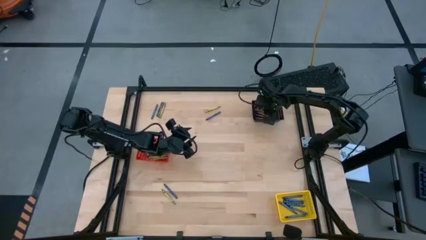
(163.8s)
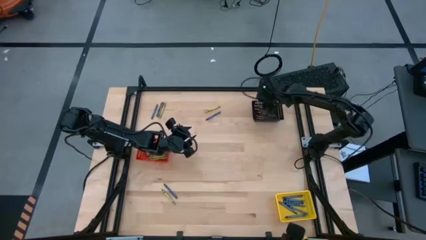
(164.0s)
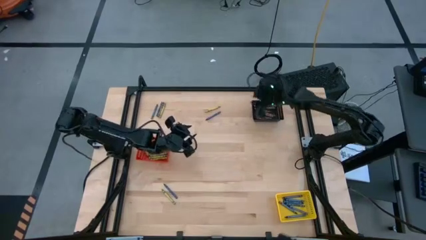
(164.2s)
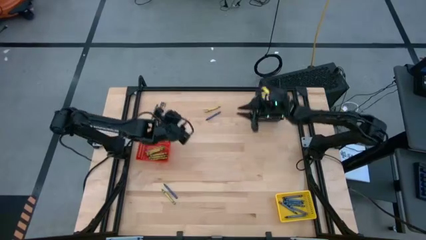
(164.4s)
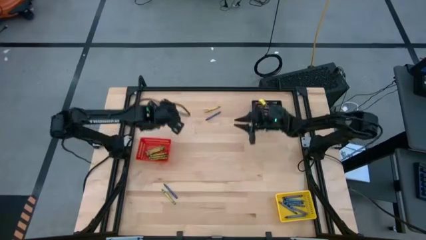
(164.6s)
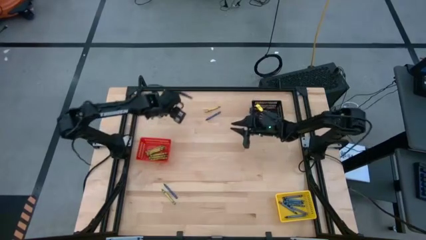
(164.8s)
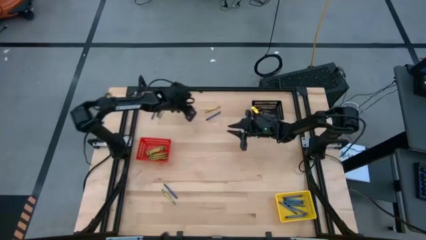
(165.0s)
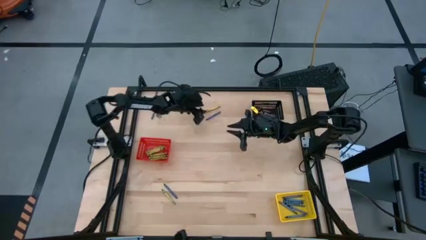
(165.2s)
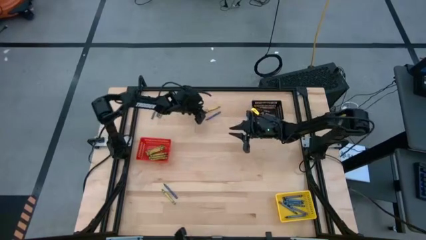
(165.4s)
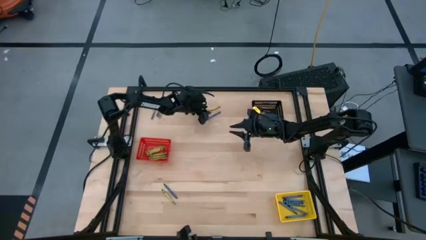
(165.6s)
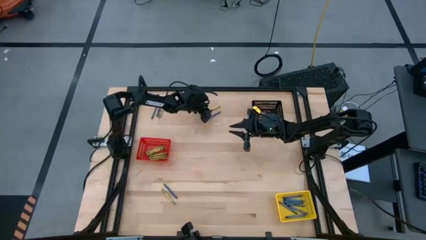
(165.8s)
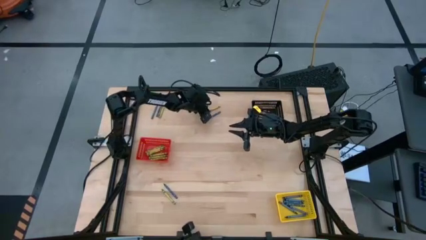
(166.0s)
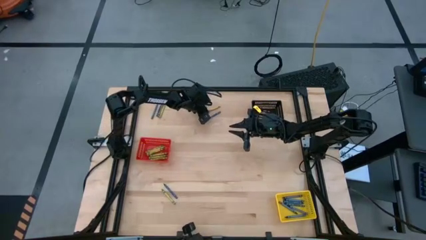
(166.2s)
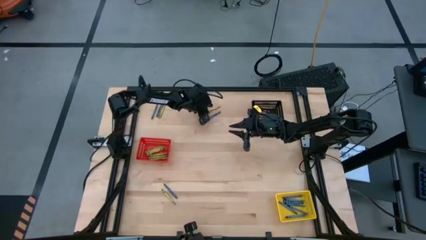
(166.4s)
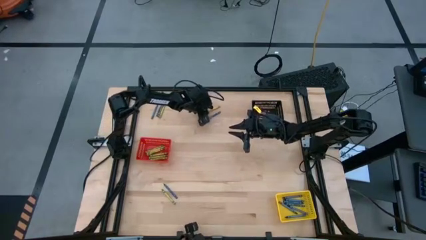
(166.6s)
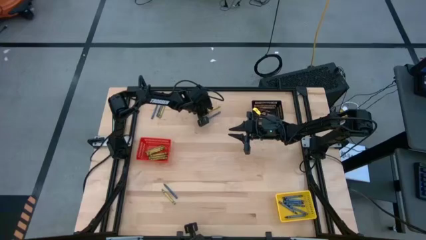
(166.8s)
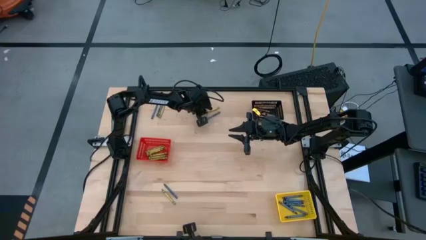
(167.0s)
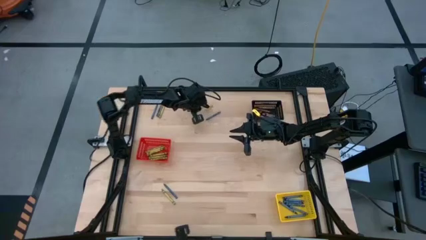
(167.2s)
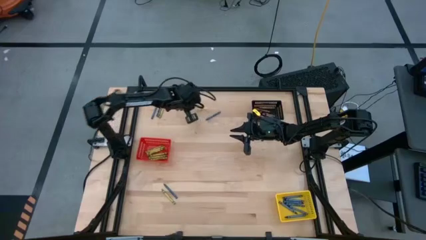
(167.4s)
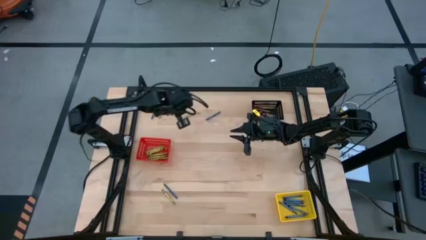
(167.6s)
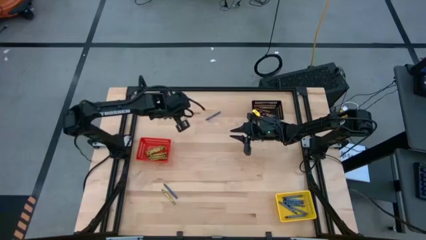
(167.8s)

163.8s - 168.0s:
Task: Sort crayons
Put the light green crayon into the red bin

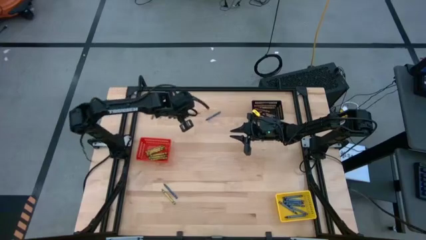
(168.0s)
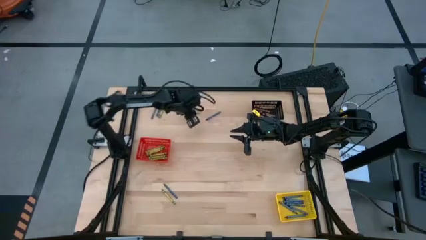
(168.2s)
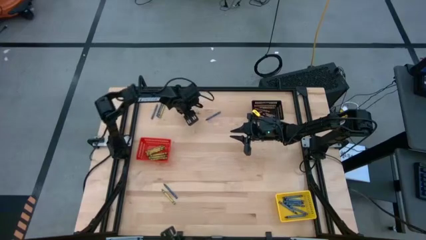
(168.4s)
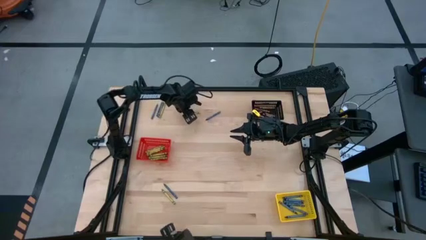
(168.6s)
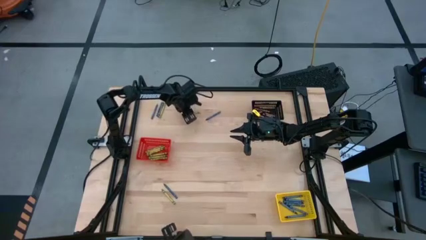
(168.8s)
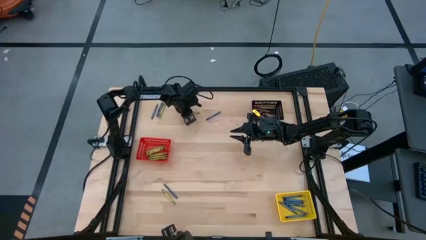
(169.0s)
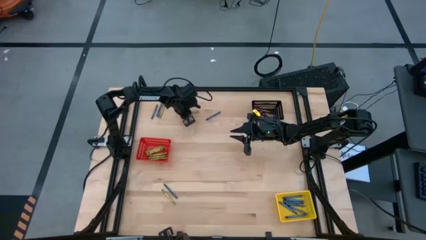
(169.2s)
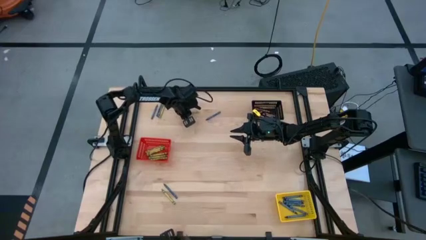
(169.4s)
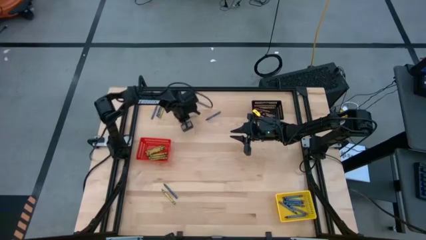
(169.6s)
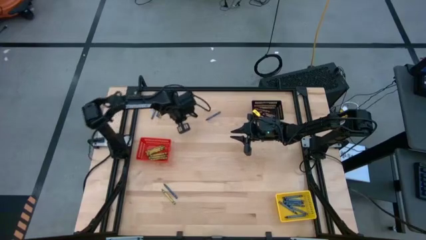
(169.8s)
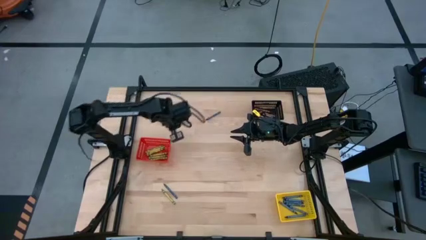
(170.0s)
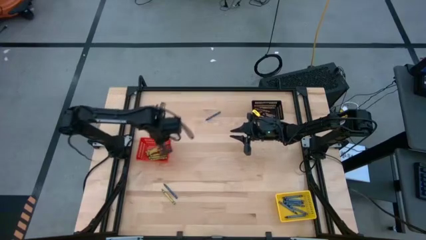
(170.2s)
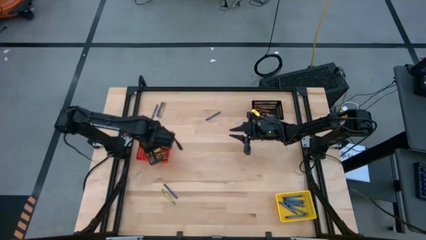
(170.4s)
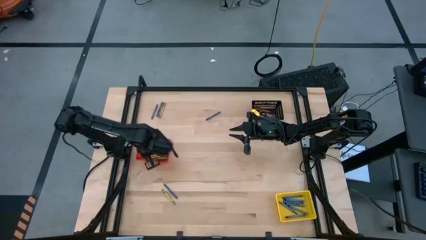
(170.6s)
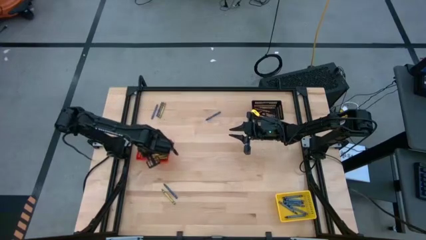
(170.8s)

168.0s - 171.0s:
Put the light green crayon into the red bin

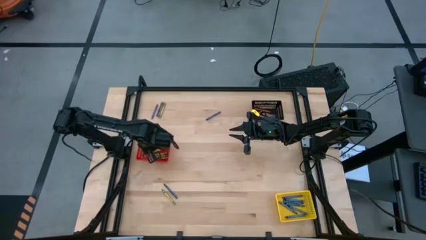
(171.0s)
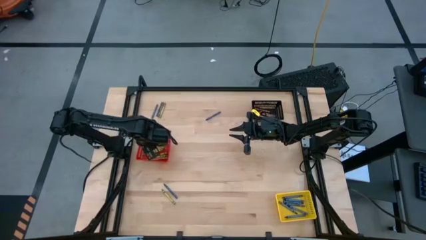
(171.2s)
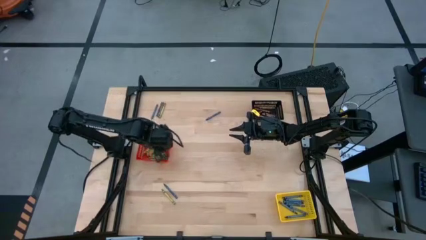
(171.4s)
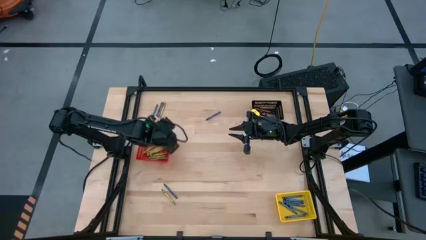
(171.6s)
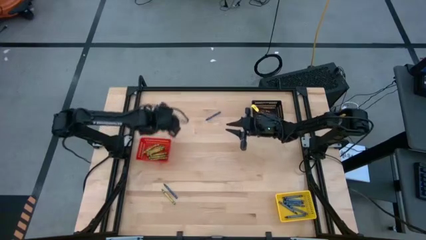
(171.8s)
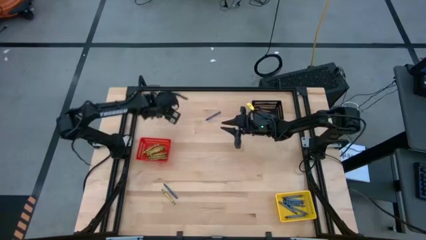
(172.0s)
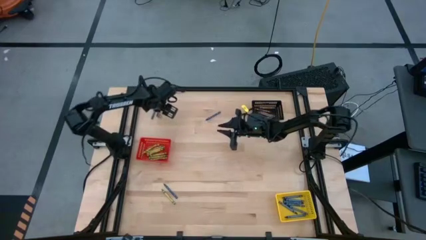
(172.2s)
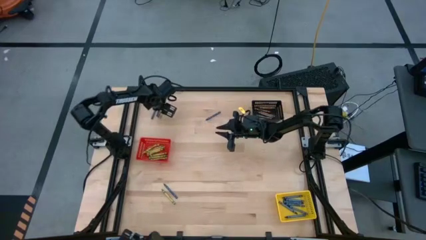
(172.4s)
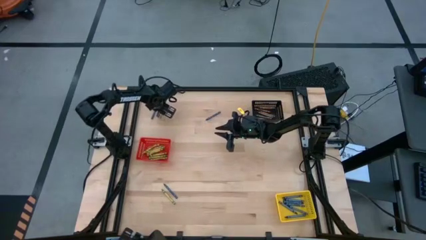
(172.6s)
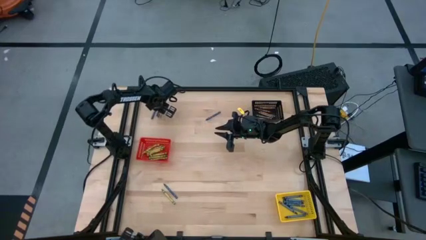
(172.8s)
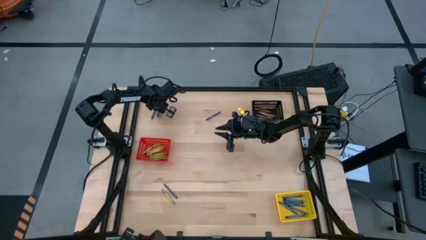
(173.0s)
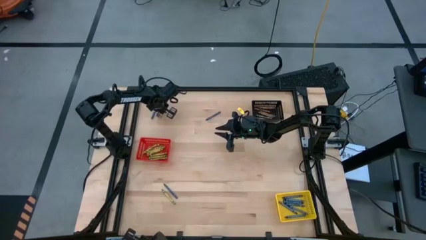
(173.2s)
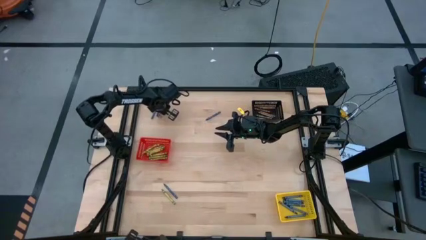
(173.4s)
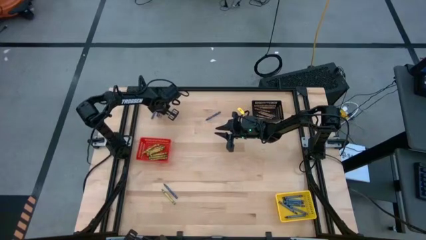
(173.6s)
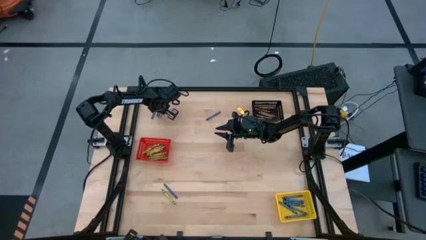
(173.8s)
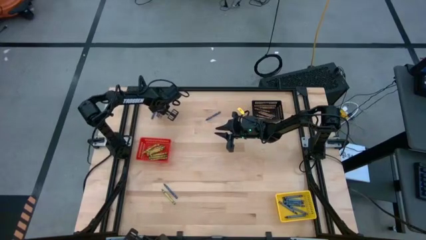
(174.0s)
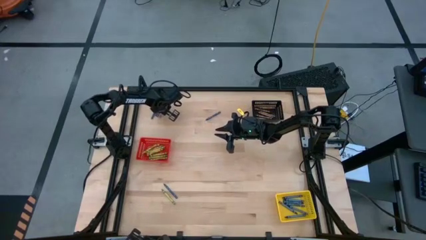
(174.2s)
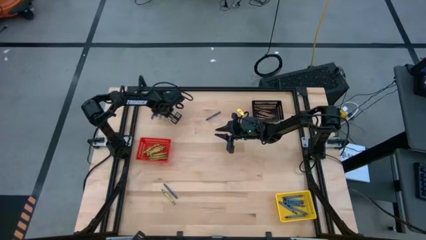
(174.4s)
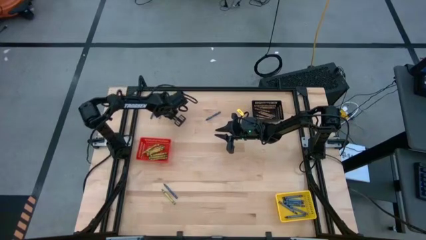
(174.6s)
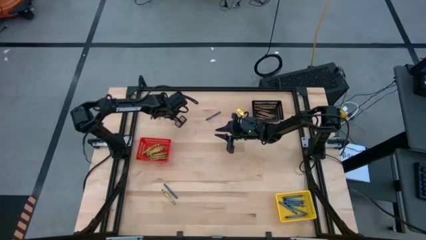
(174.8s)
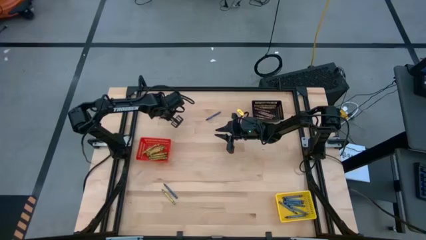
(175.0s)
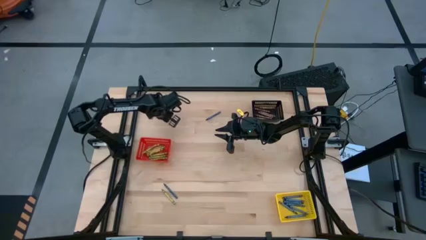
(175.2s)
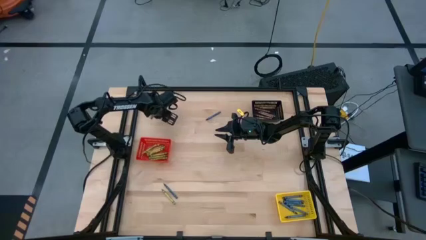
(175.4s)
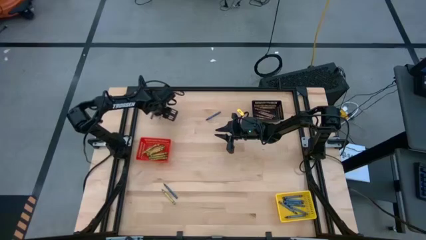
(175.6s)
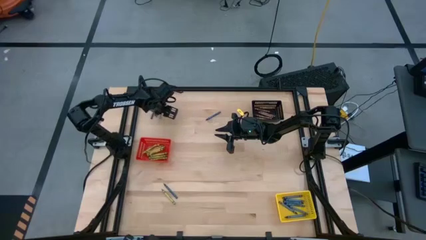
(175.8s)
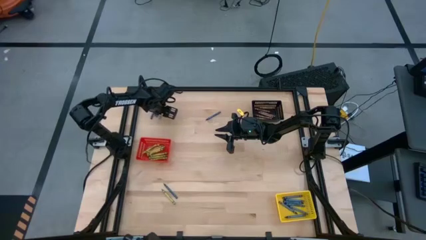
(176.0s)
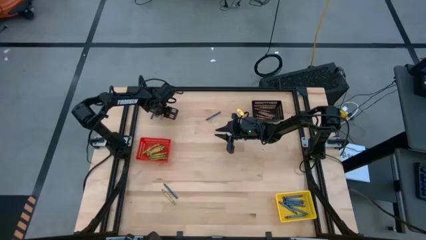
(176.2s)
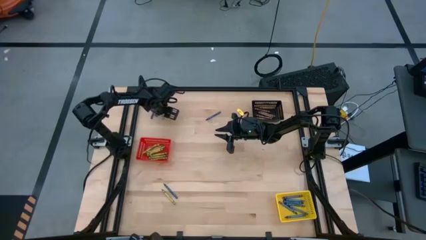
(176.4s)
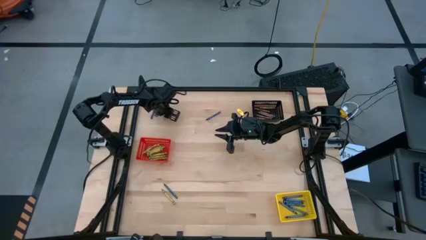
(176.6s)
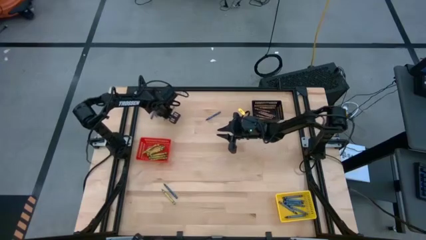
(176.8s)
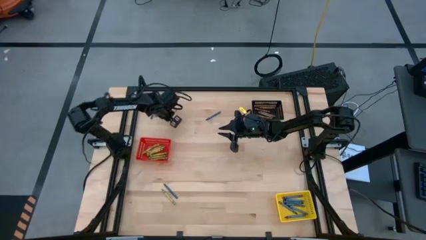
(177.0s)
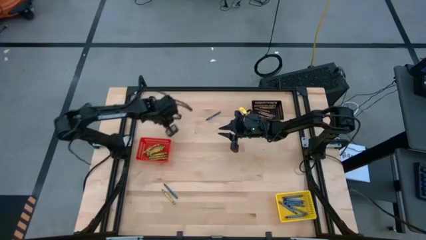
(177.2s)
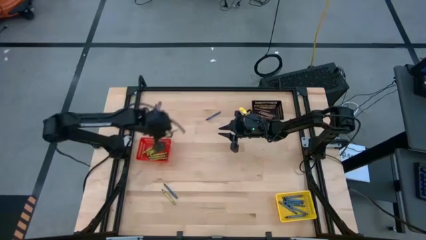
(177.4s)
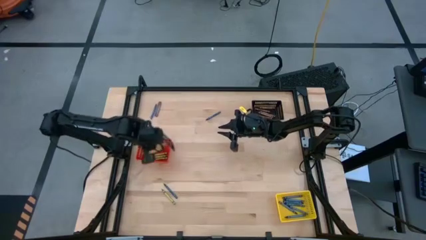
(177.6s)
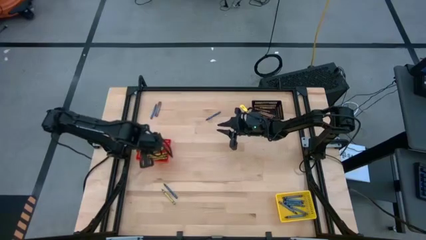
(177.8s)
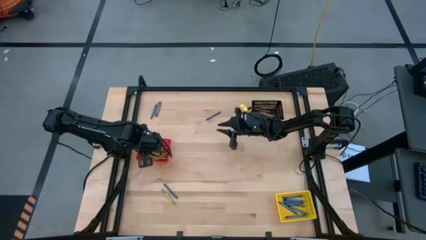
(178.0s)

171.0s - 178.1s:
Put the top green crayon into the red bin

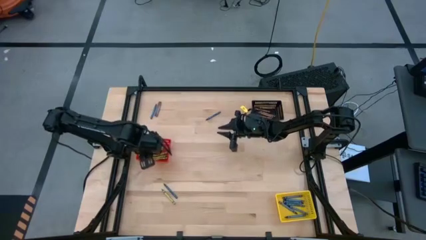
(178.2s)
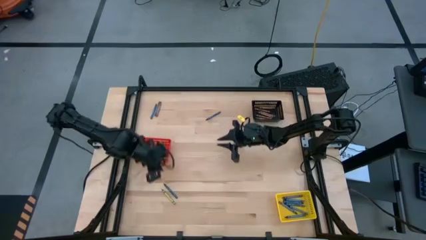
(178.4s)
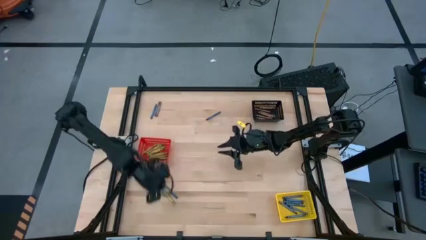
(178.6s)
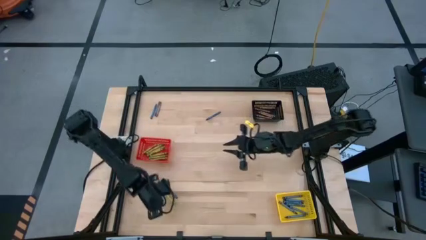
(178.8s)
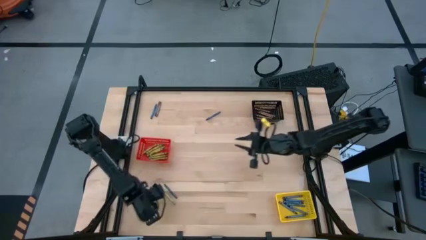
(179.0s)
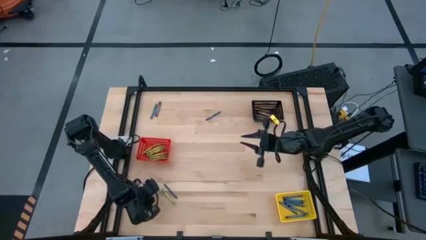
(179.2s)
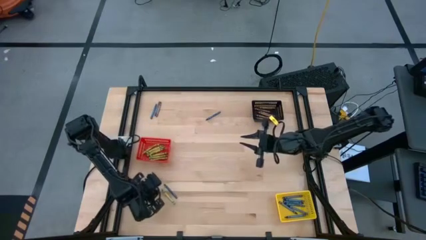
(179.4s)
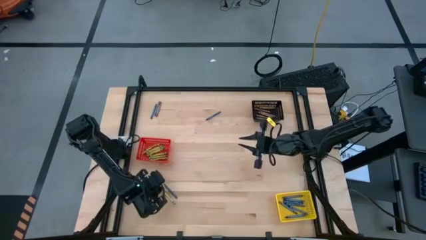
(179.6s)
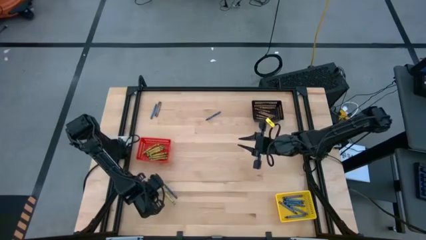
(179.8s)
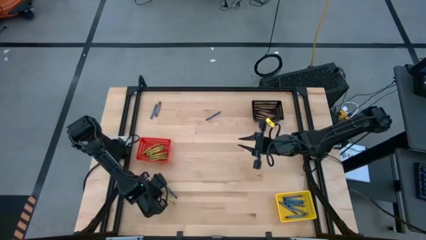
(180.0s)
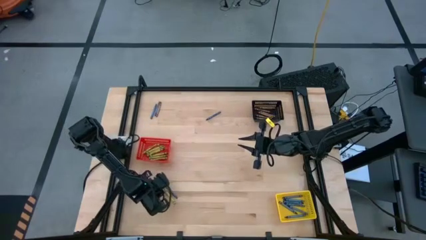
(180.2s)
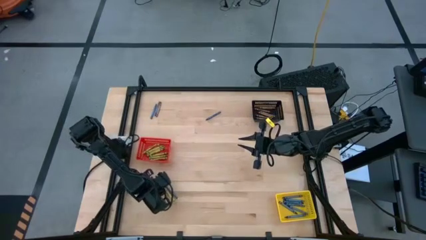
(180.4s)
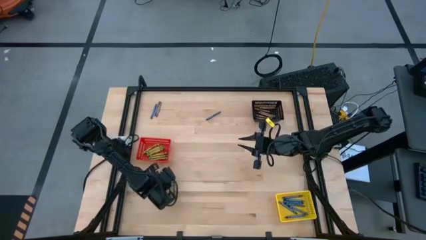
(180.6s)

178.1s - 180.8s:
Adjust the green crayon on the table
